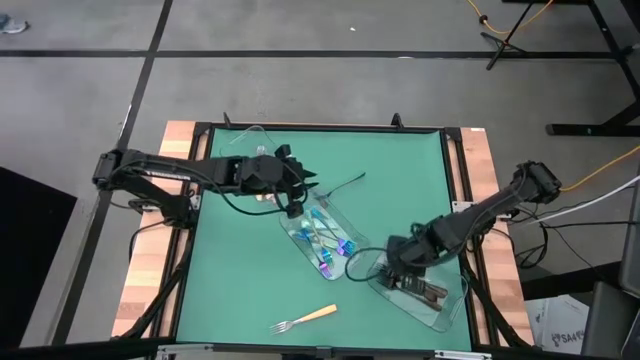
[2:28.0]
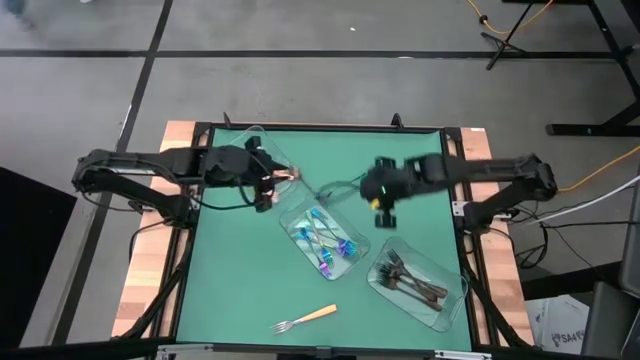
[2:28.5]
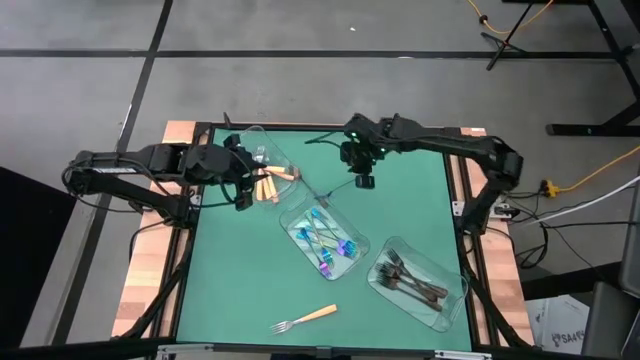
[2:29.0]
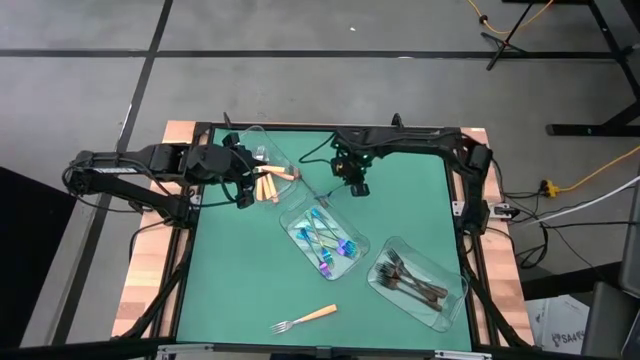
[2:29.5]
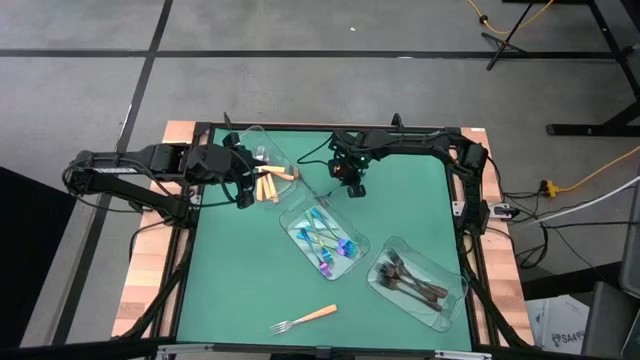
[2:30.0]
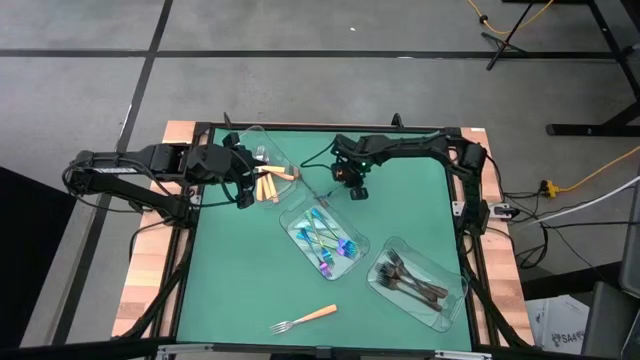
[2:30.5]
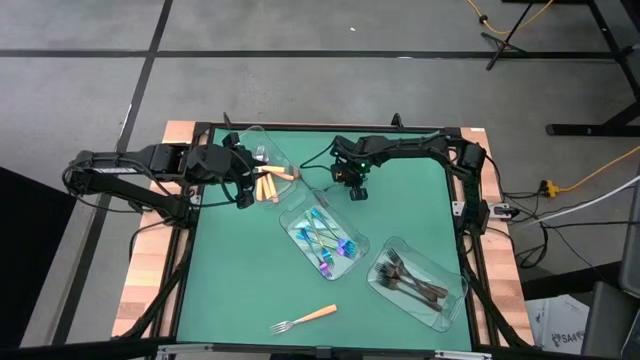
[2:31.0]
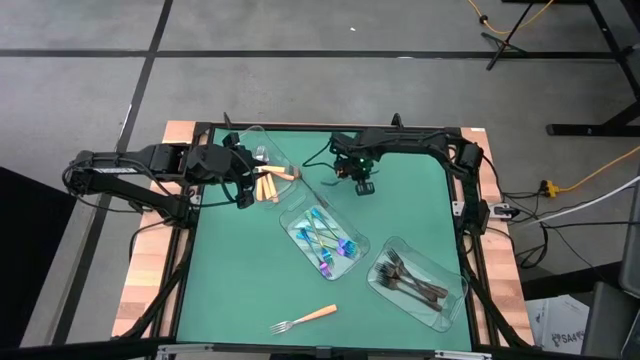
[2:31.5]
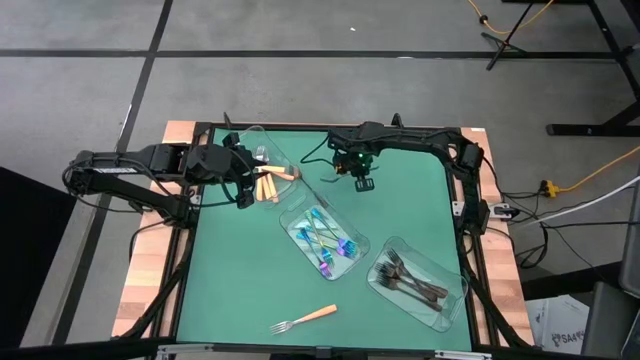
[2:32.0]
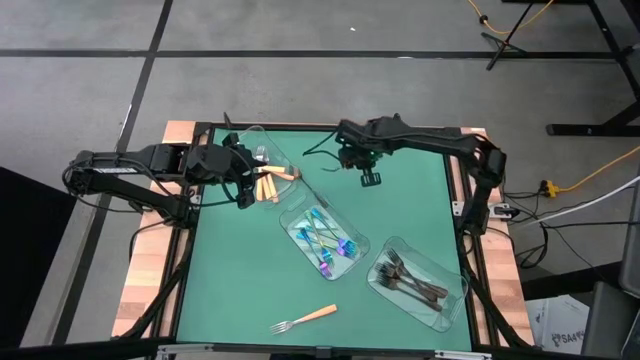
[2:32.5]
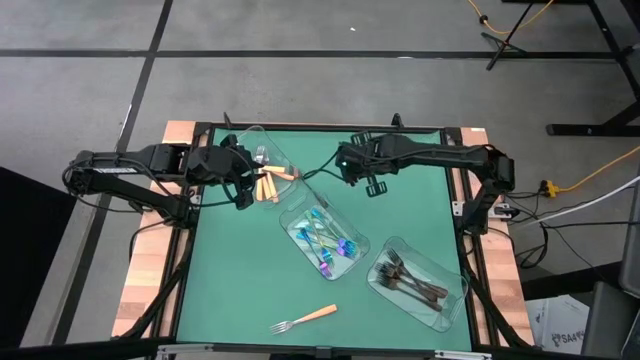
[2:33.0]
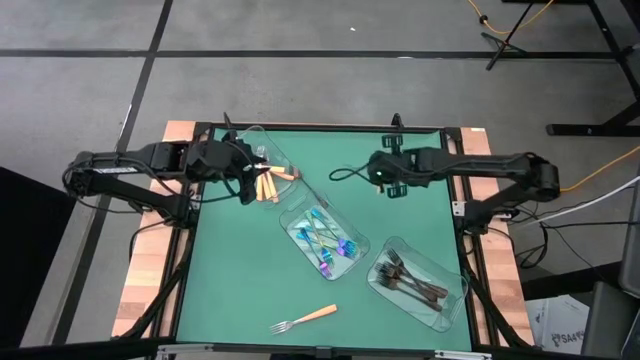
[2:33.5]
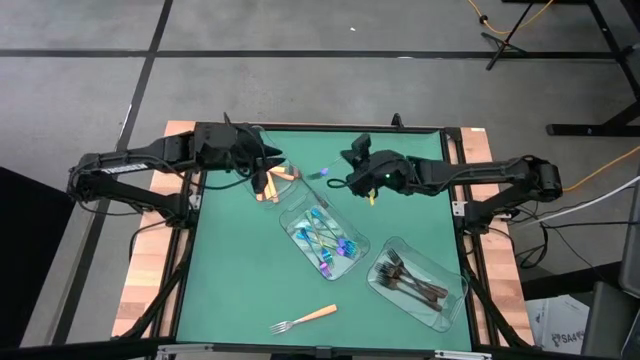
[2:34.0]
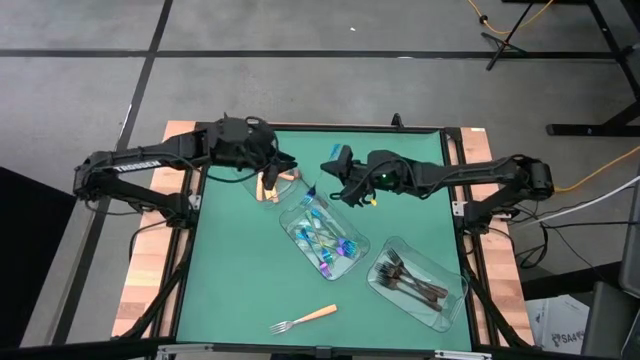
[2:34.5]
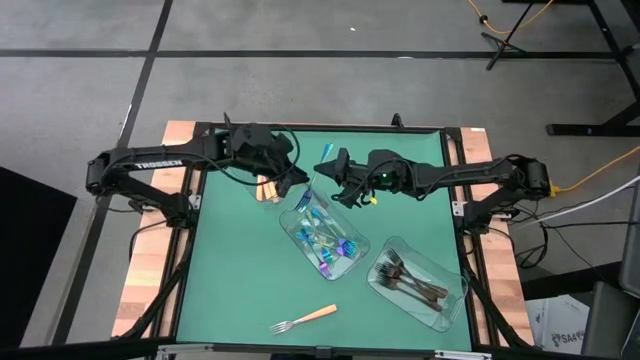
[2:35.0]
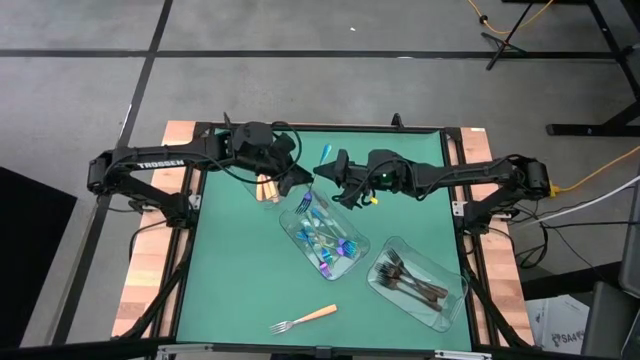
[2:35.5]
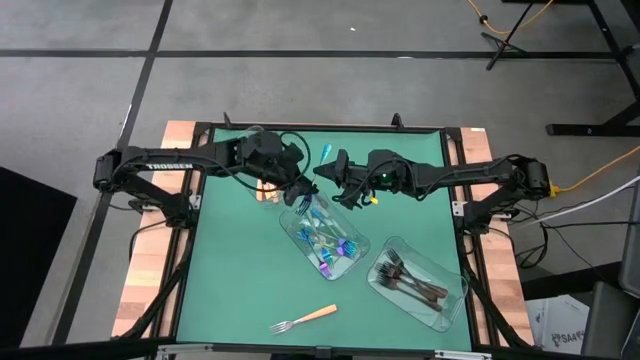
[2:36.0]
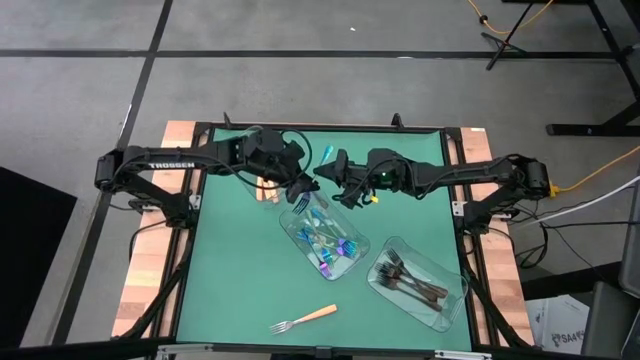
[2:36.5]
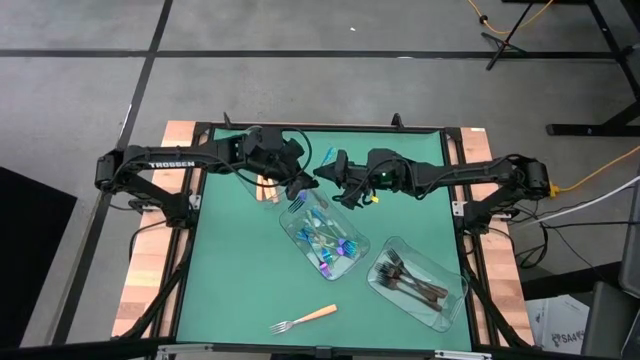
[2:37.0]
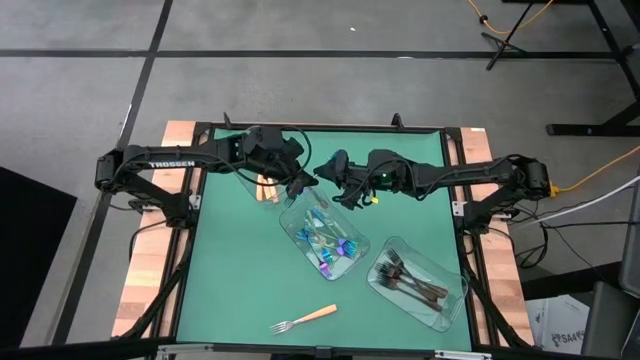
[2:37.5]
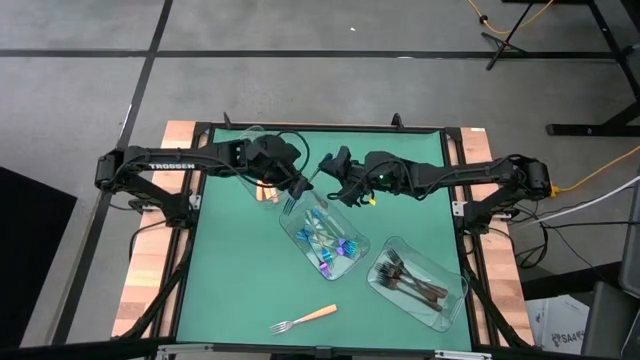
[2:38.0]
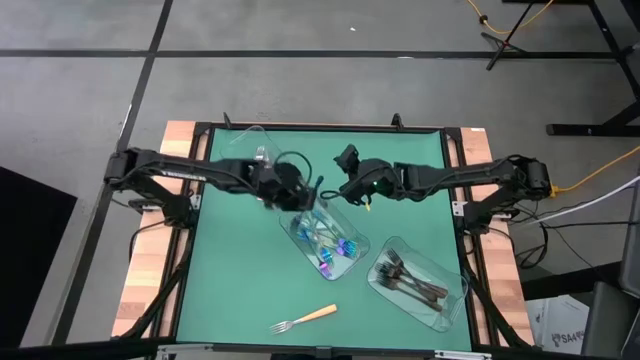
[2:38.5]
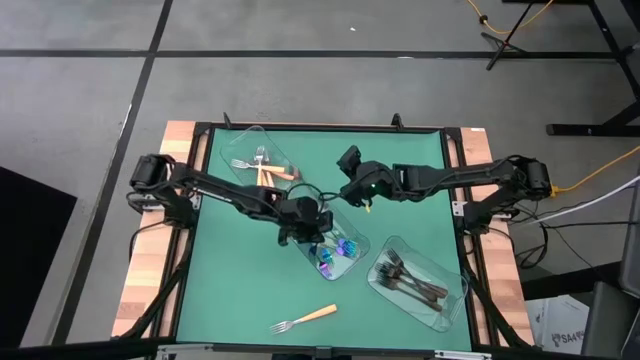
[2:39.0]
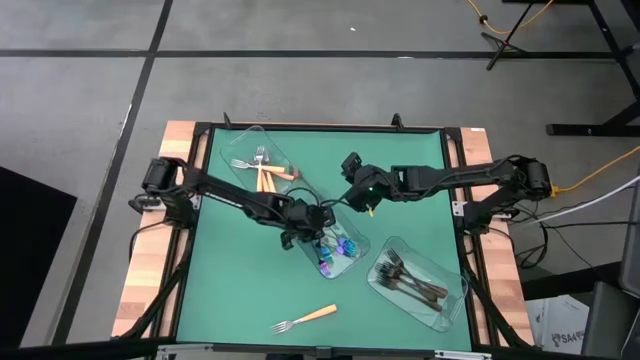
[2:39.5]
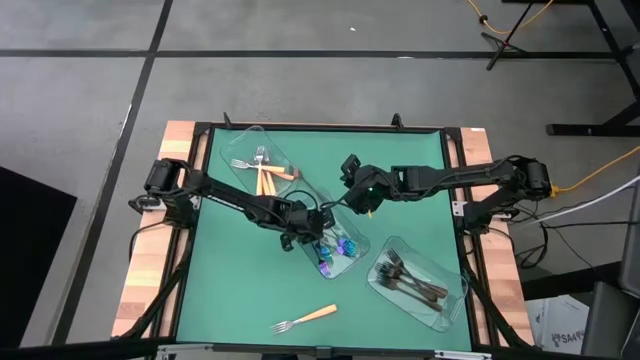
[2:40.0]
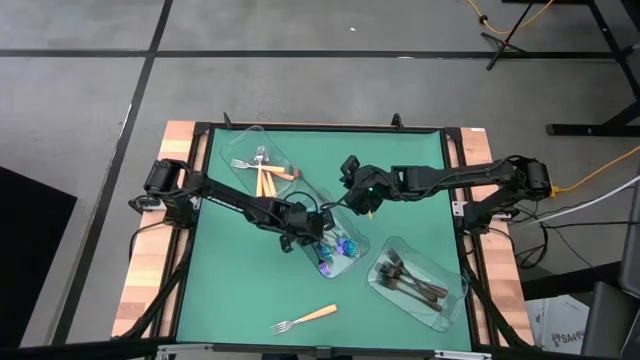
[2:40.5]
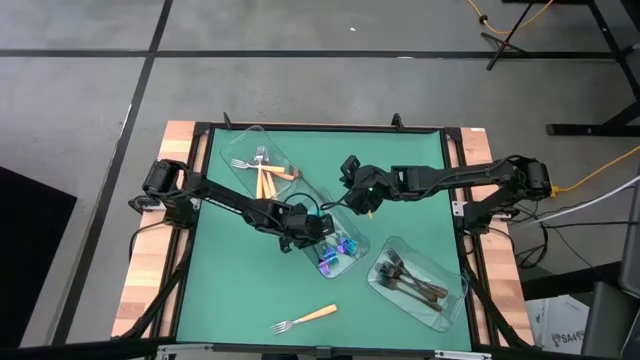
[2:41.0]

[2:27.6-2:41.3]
Task: Sort silverware by color (type)
Put the blue fork into the center transparent bin

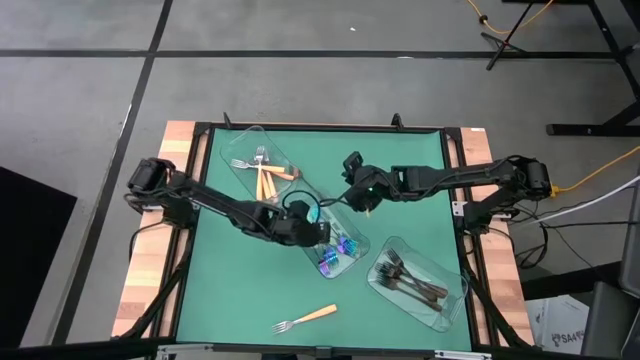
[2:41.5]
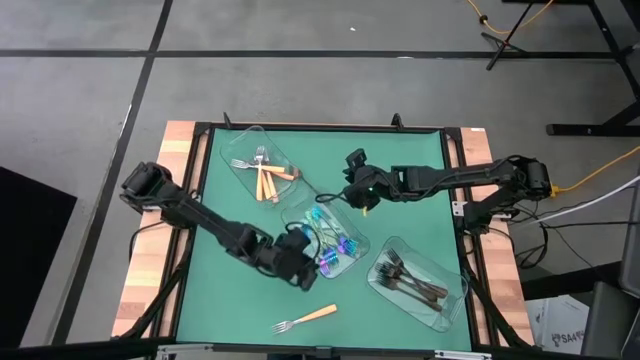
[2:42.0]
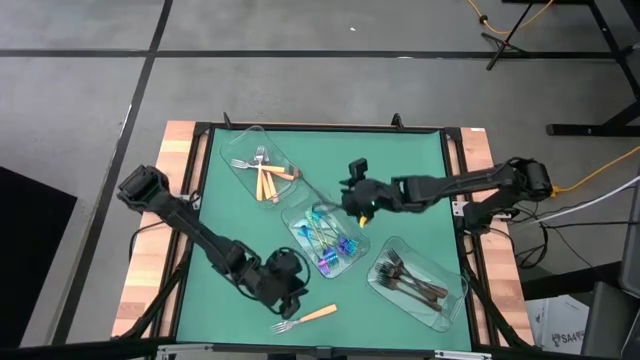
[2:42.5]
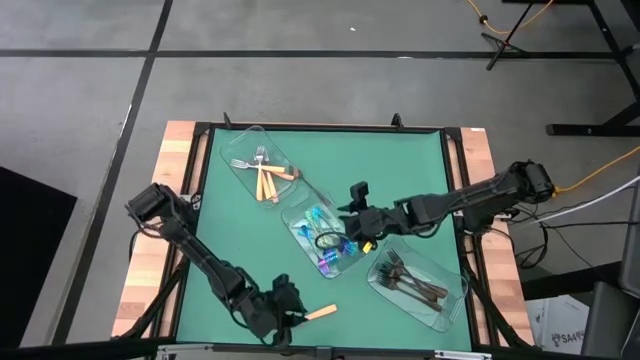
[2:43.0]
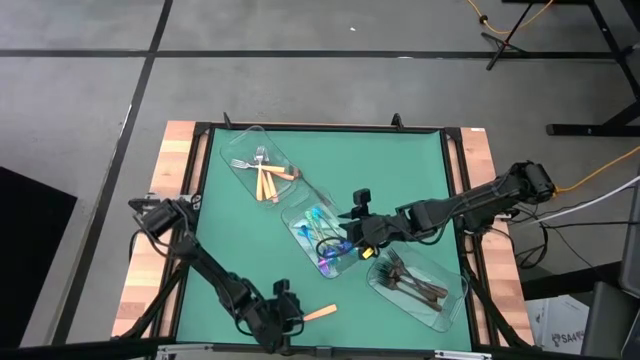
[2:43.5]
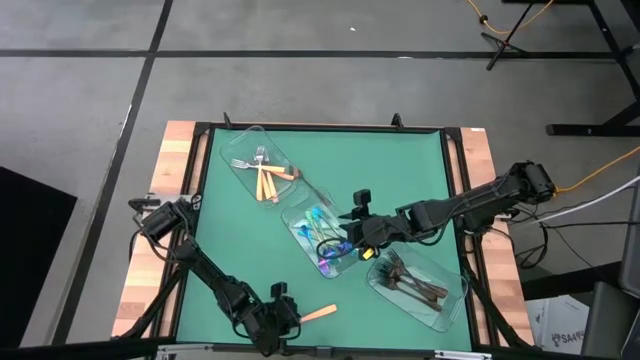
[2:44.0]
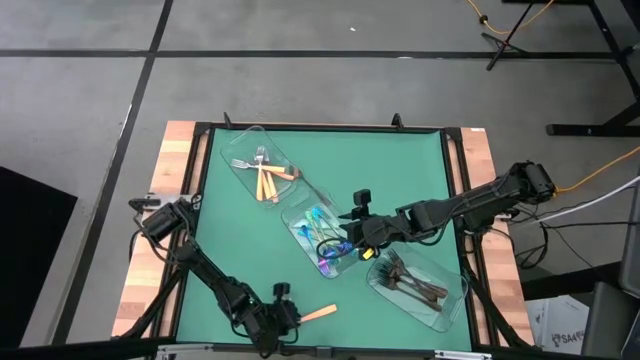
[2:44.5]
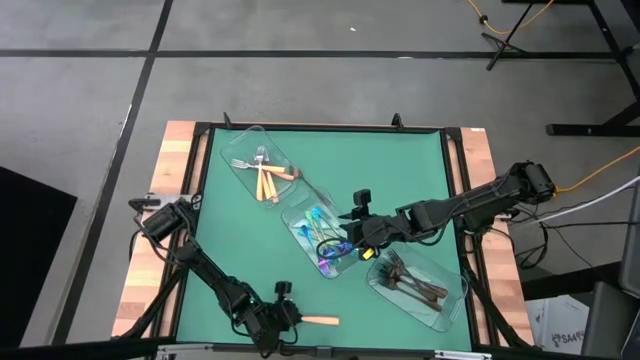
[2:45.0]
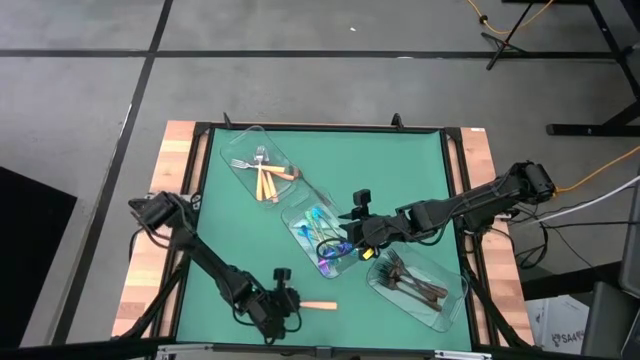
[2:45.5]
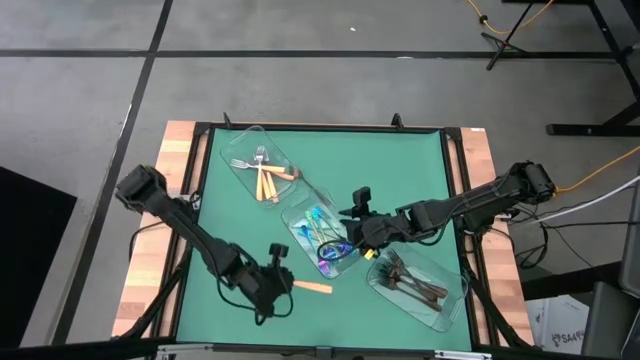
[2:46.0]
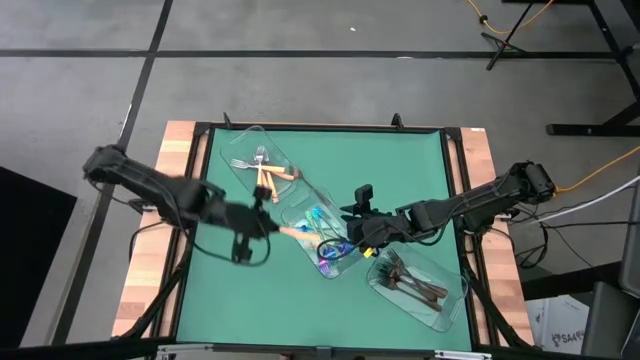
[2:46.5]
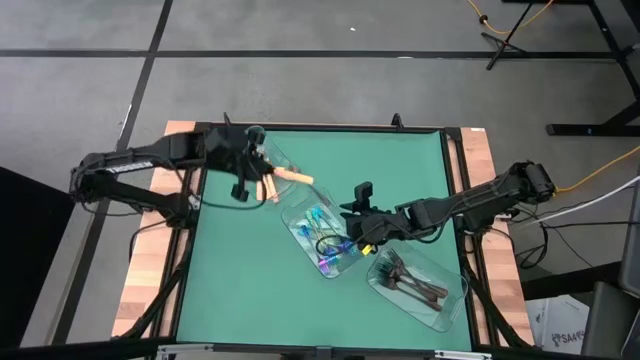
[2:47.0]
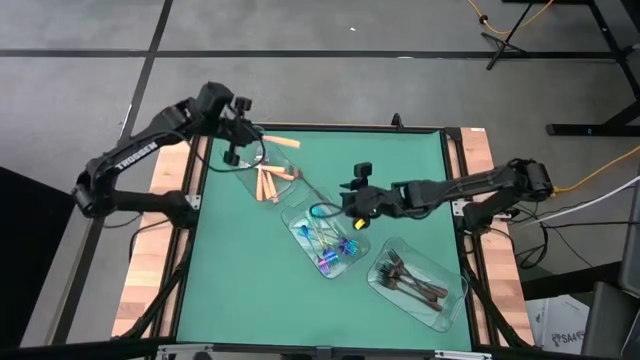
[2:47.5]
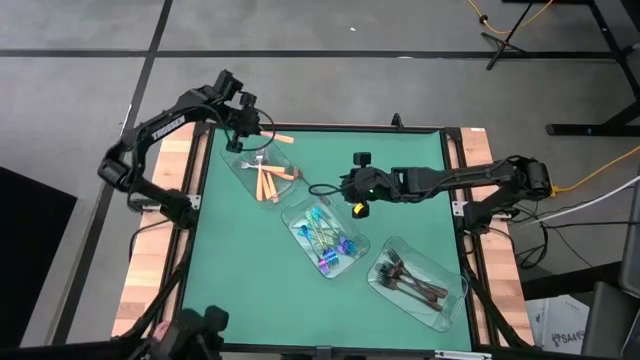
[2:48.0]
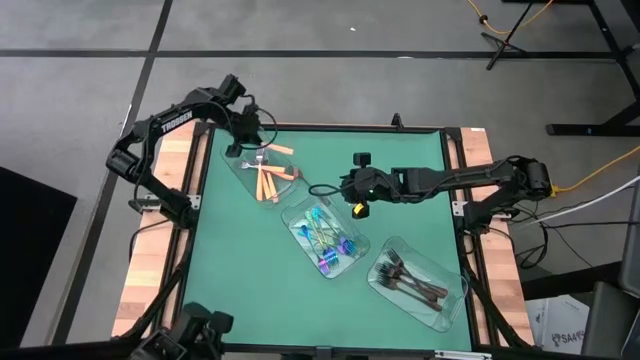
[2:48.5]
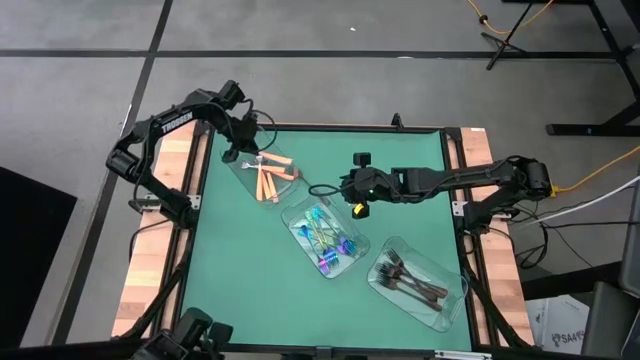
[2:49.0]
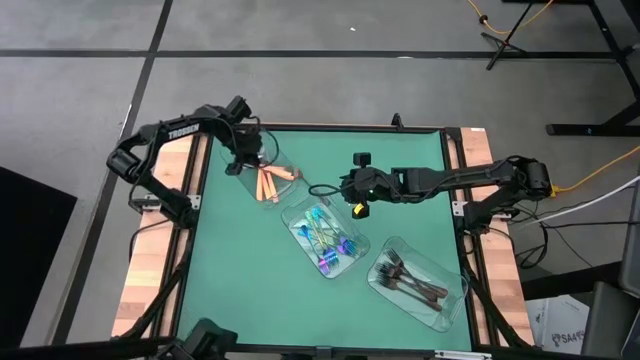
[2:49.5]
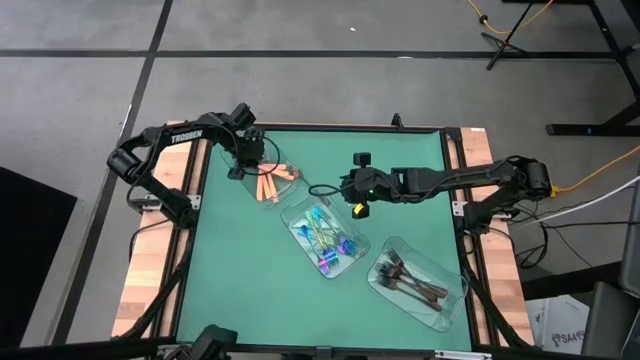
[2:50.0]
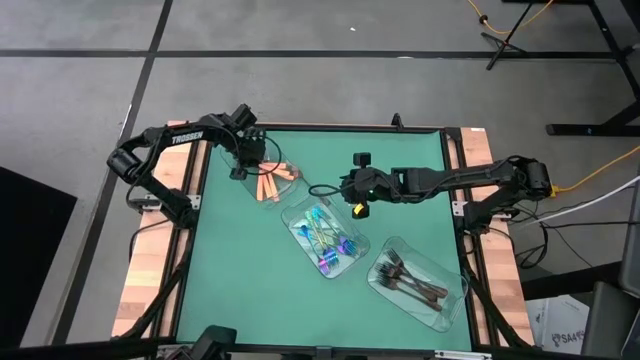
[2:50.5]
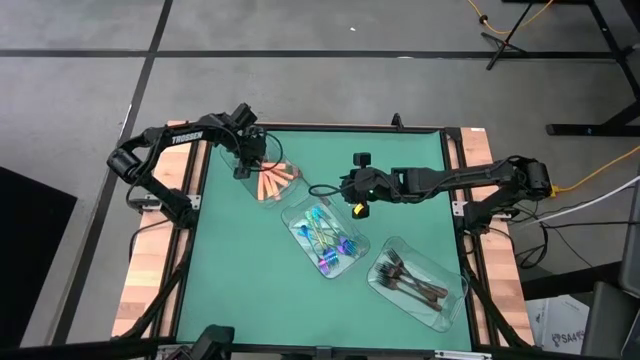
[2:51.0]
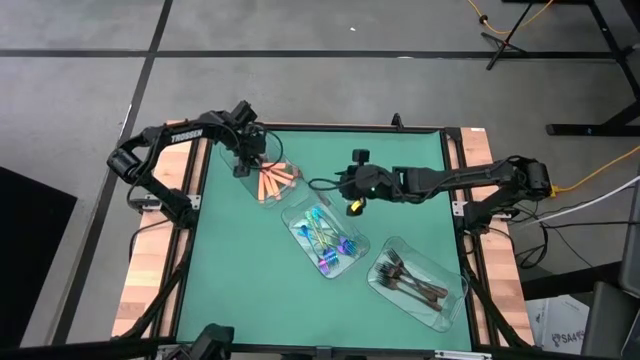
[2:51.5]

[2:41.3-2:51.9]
Put the yellow fork into the top transparent bin
